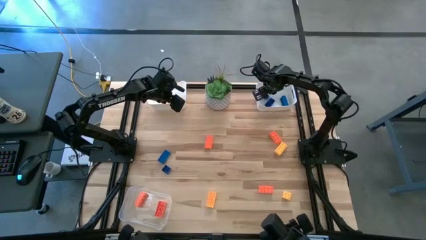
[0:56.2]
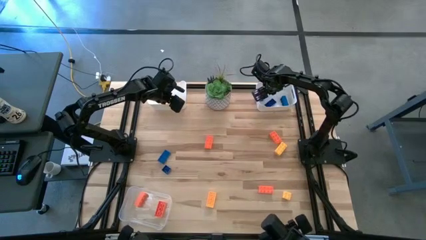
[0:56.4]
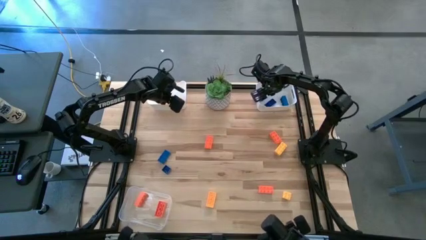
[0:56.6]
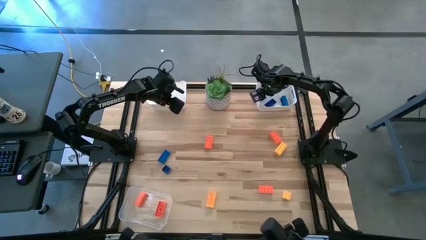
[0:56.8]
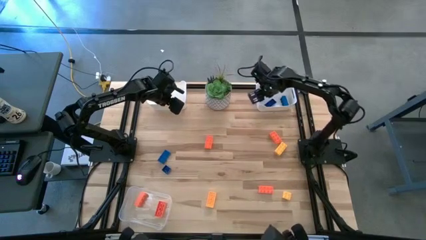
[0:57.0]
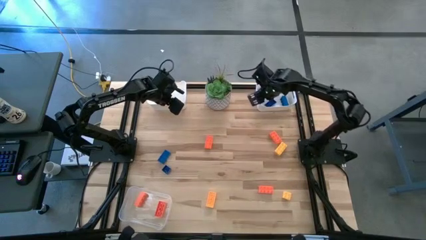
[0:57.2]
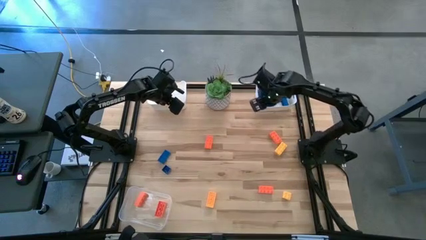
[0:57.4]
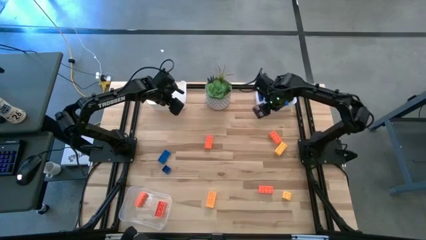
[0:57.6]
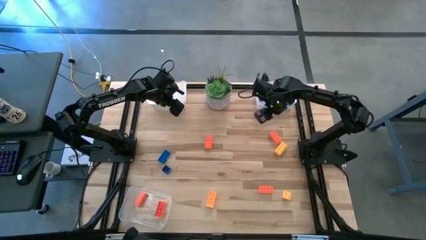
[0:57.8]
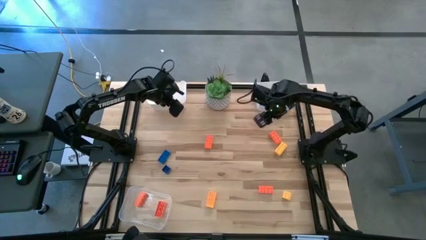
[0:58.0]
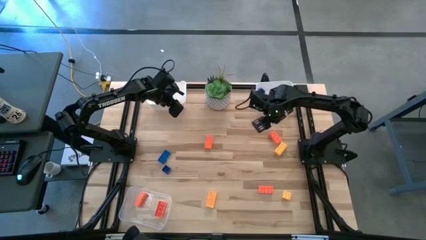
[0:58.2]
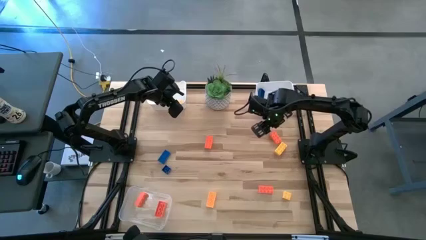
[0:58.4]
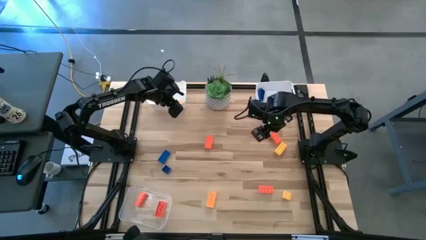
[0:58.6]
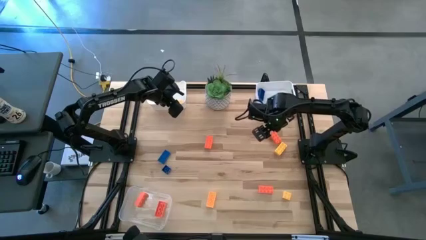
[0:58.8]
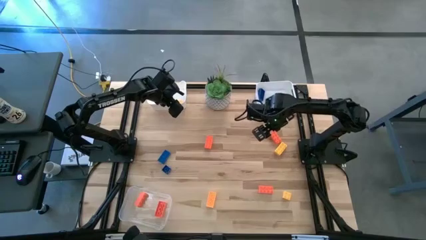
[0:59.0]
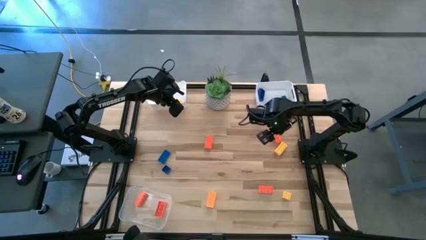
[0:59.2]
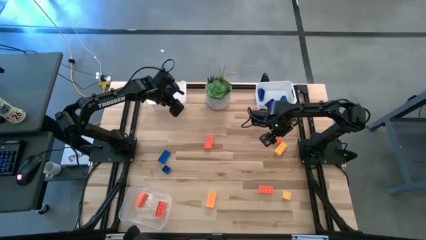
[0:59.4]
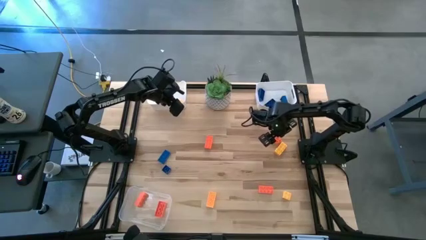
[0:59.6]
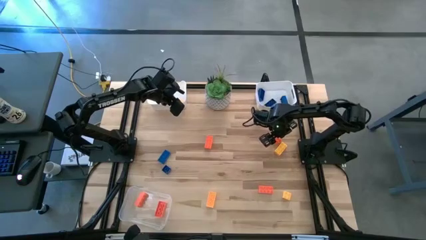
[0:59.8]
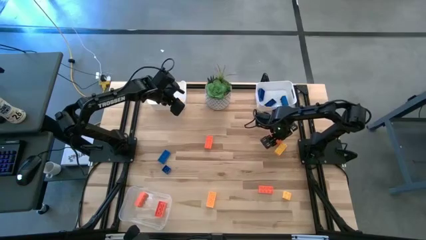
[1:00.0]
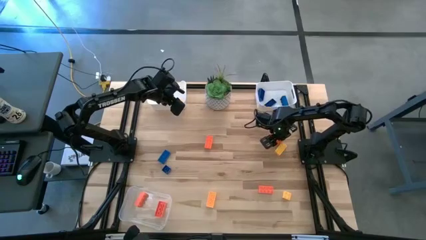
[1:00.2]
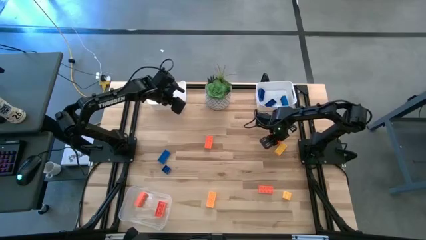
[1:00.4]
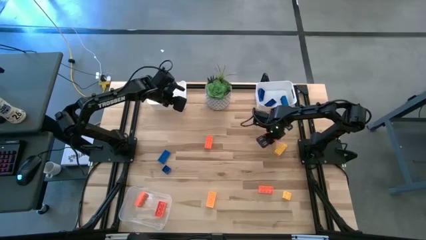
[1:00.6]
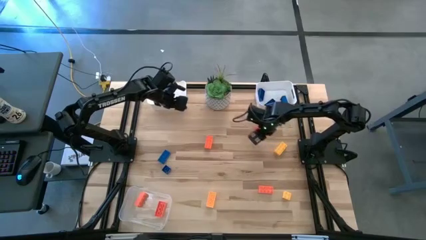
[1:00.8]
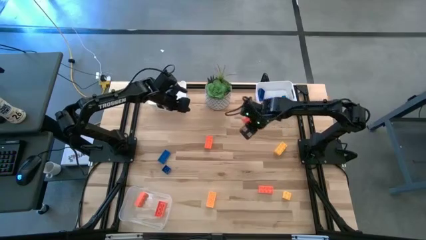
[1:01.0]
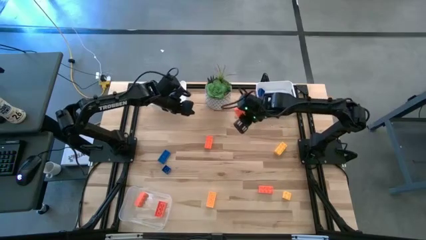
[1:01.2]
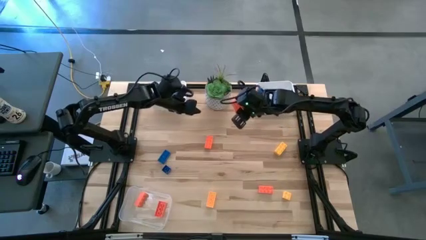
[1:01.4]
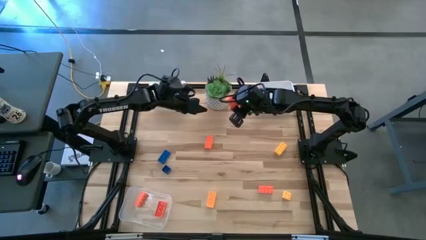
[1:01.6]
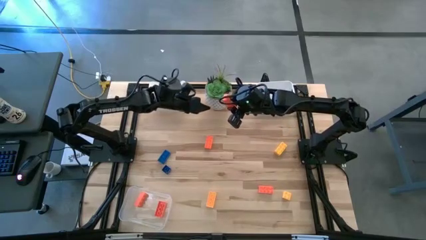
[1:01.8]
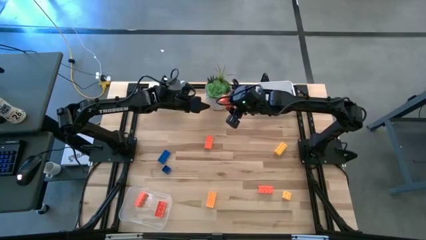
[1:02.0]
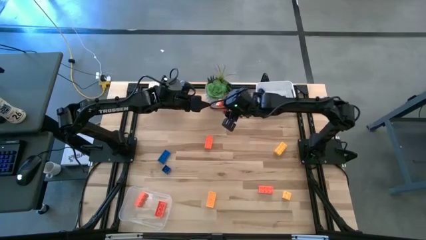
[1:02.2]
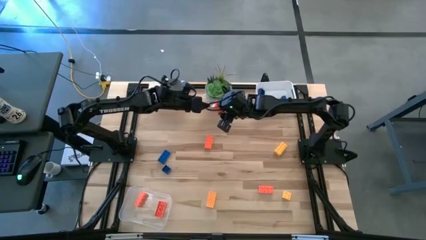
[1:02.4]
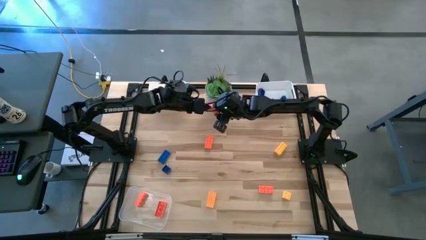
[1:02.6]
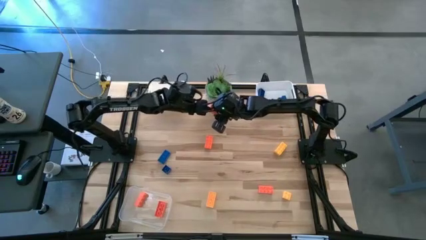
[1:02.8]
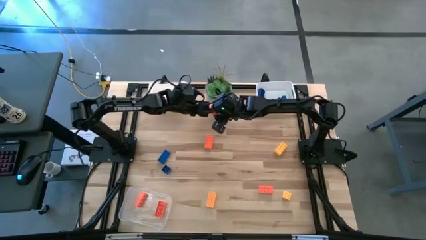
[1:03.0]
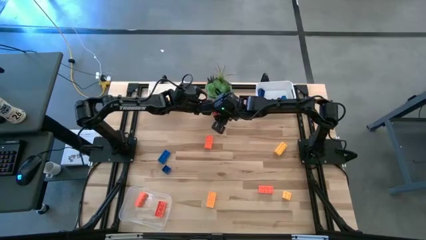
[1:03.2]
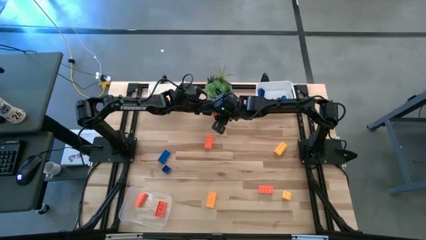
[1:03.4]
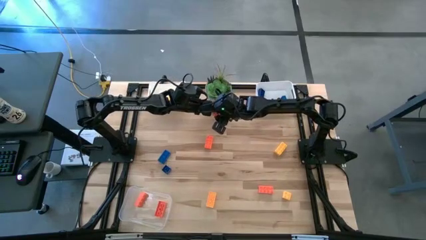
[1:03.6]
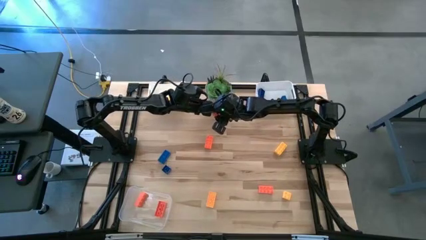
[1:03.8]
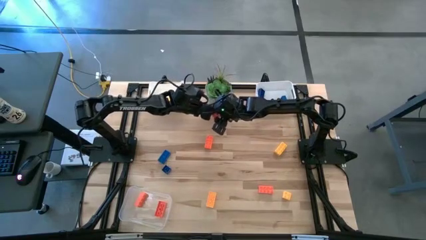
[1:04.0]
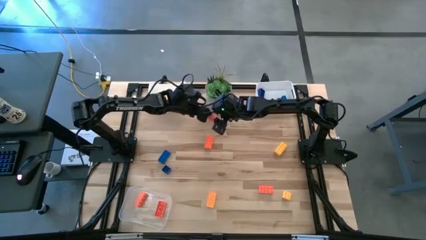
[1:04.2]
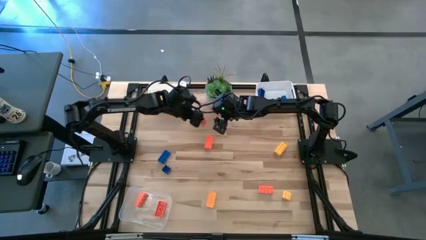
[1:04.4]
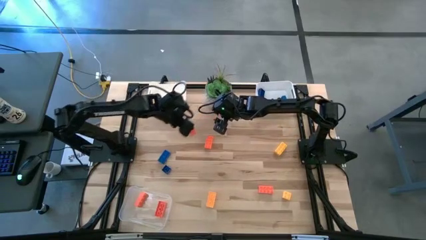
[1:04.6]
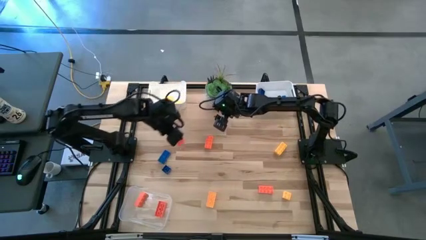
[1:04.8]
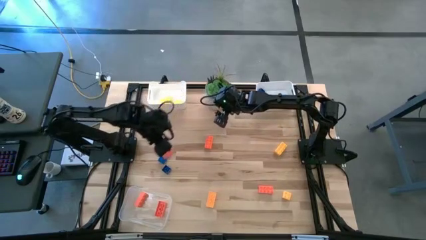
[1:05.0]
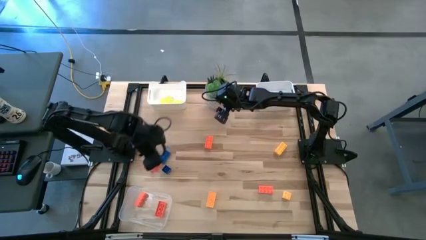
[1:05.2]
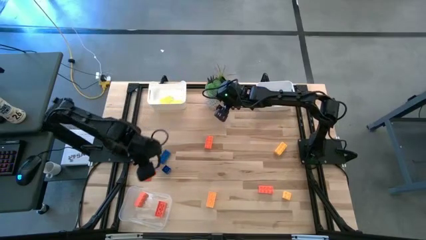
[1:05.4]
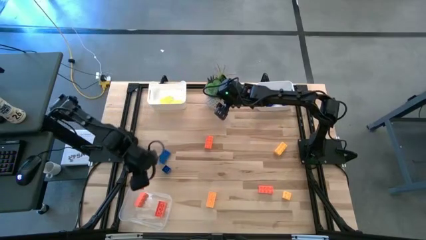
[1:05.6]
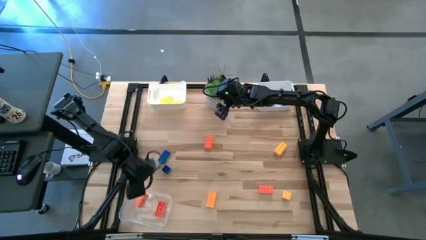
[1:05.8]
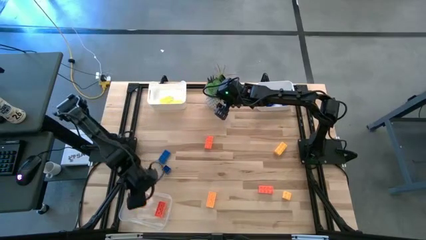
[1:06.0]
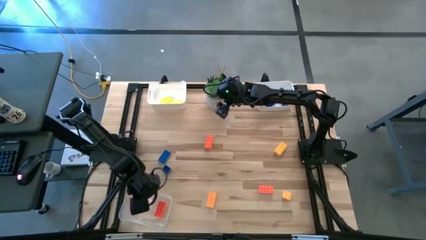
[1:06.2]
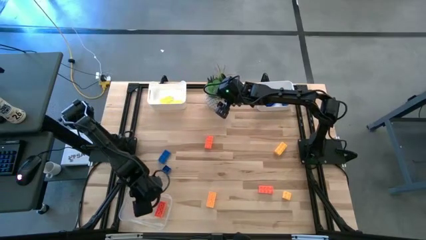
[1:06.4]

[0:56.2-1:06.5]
Task: Sort & place blocks by color
Put the orange game piece into the transparent bin

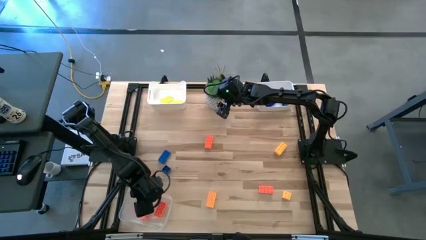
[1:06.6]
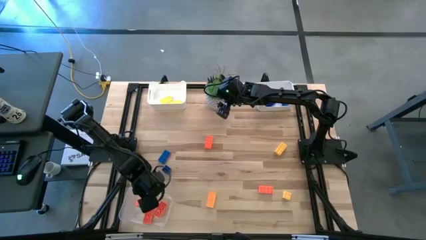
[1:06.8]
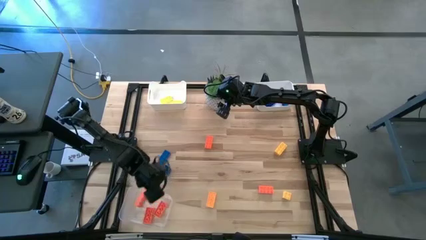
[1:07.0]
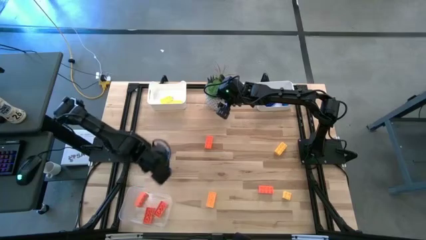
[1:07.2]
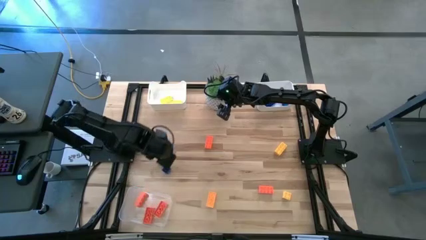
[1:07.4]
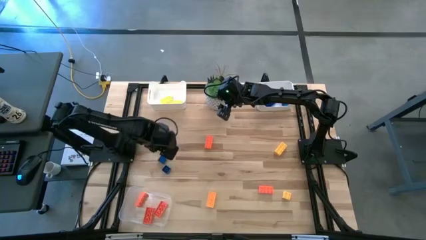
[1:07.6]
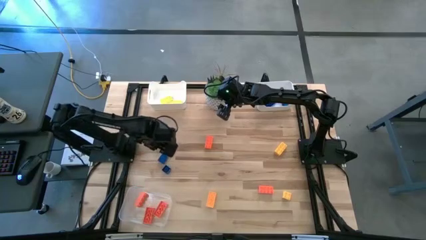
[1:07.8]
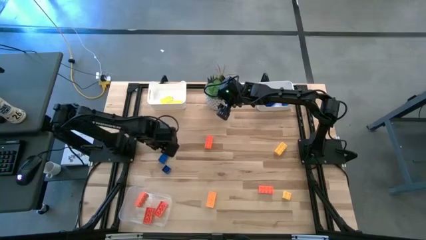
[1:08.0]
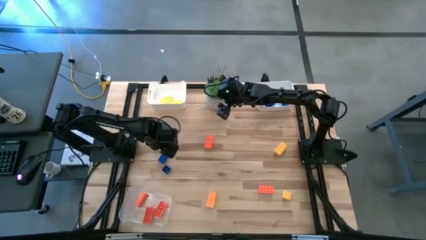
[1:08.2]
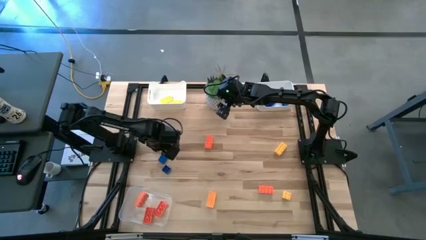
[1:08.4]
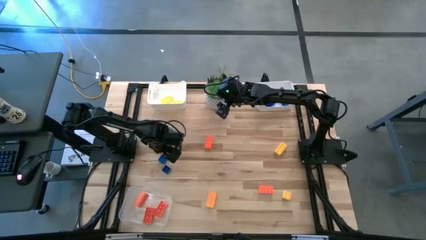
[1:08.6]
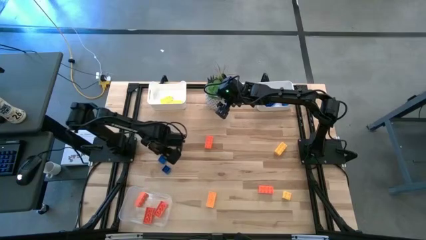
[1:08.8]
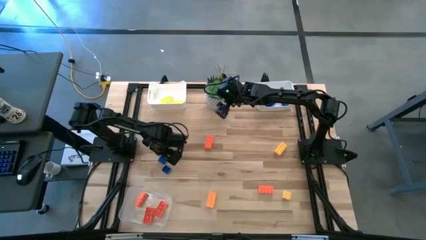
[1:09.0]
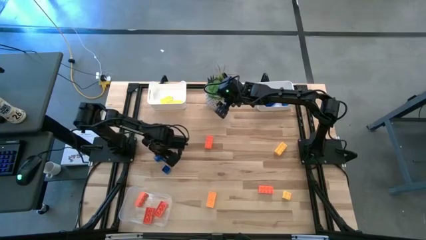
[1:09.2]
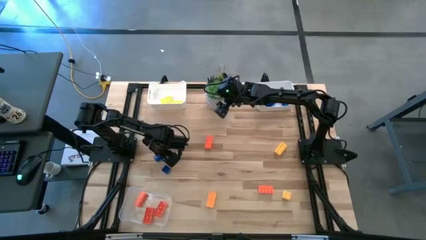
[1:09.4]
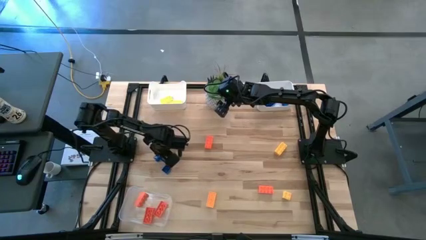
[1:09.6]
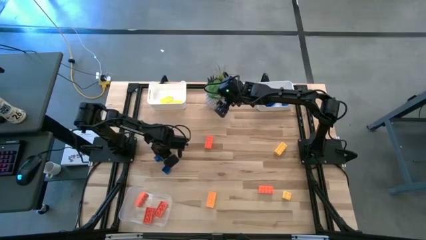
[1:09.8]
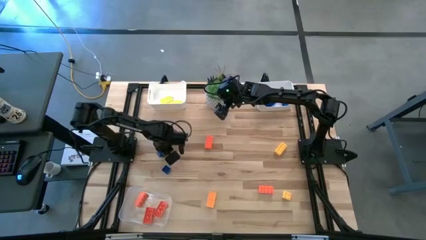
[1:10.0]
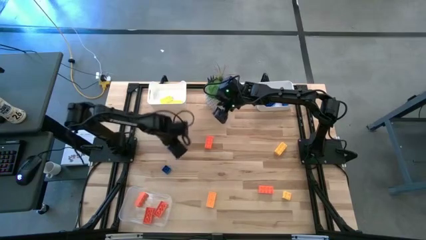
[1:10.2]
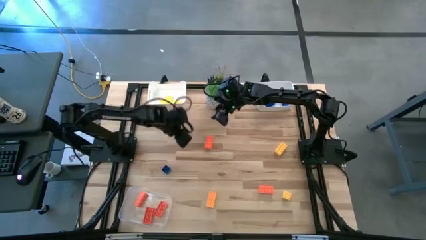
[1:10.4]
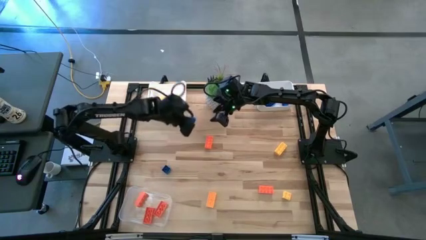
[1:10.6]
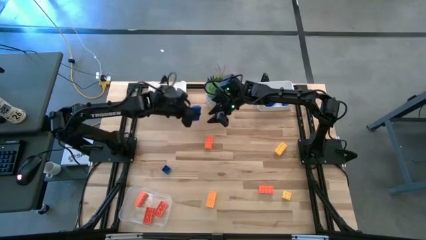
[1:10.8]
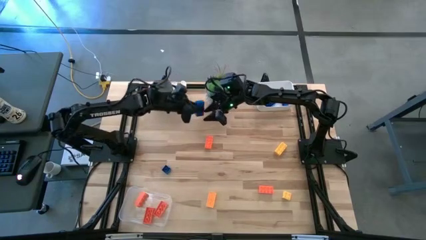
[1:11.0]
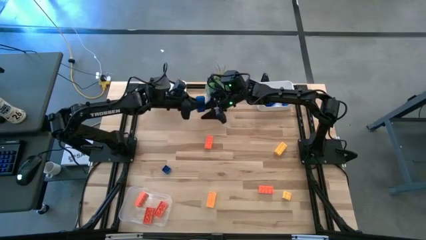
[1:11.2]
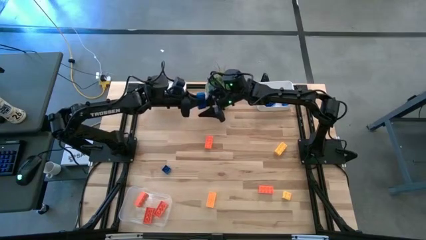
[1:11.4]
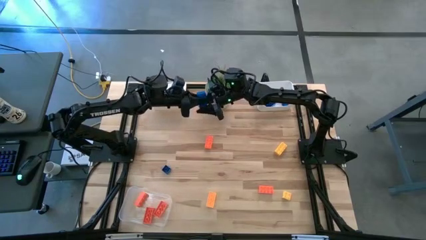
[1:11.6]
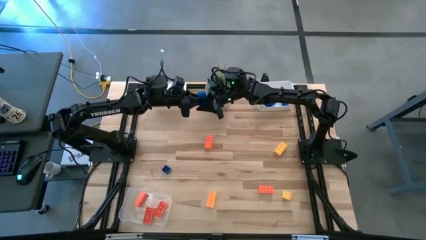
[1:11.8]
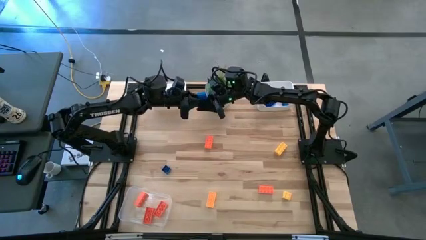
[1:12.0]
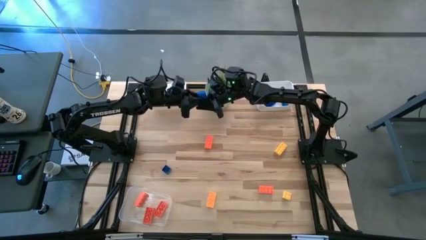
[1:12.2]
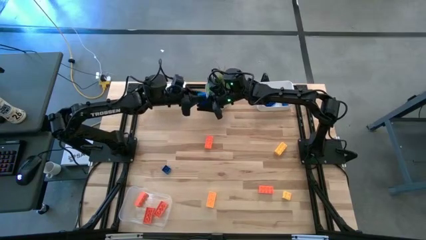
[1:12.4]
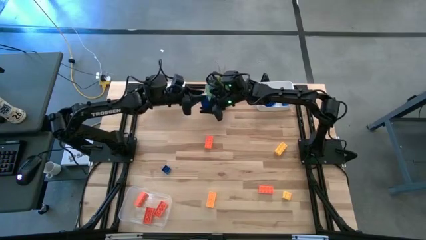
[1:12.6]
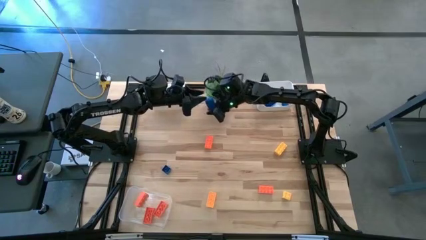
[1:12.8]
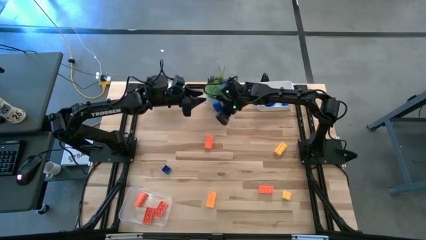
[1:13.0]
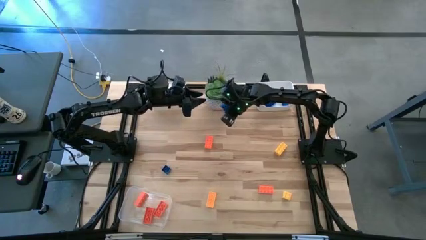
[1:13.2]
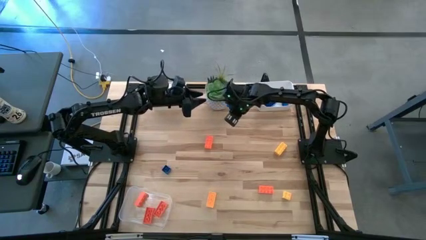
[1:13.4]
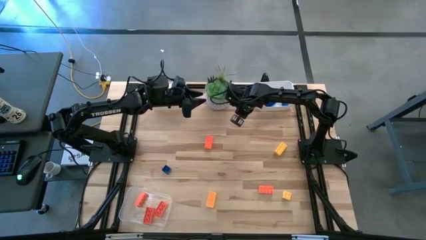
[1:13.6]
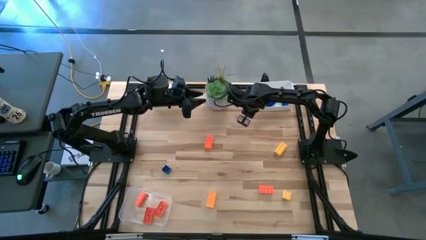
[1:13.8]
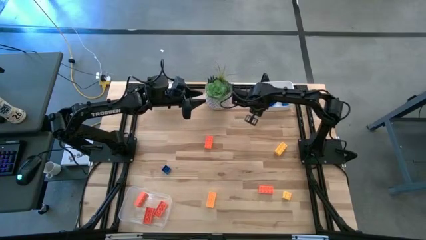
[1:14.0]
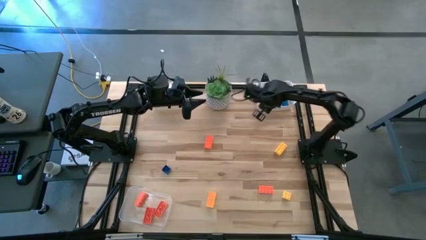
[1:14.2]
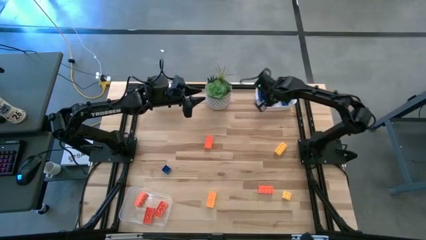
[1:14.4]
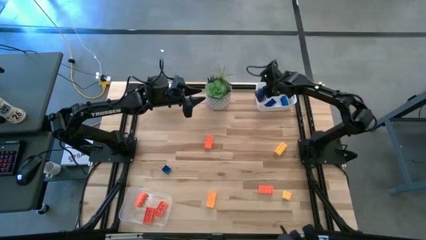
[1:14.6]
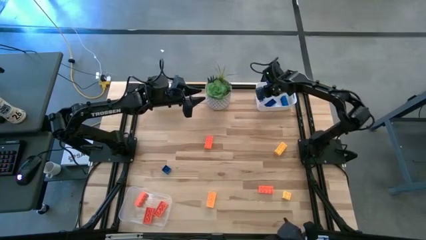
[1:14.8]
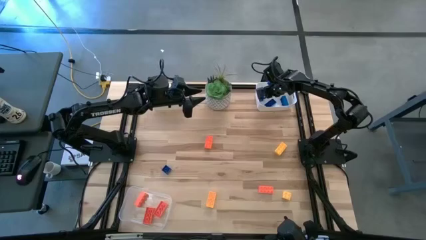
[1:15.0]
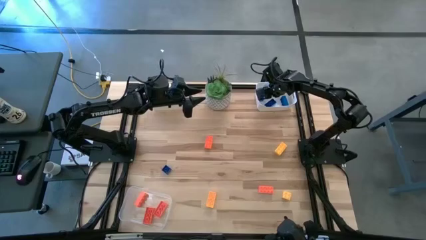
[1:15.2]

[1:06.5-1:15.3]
Put the blue game piece into the right white bin
